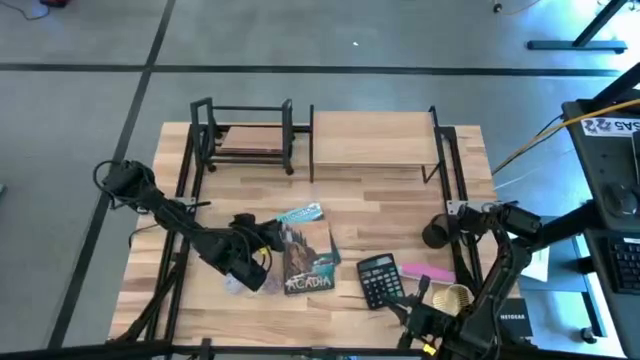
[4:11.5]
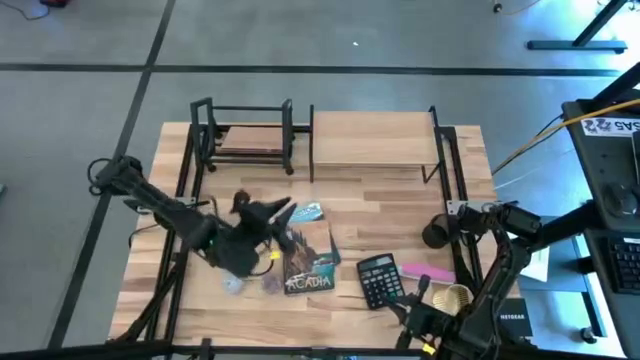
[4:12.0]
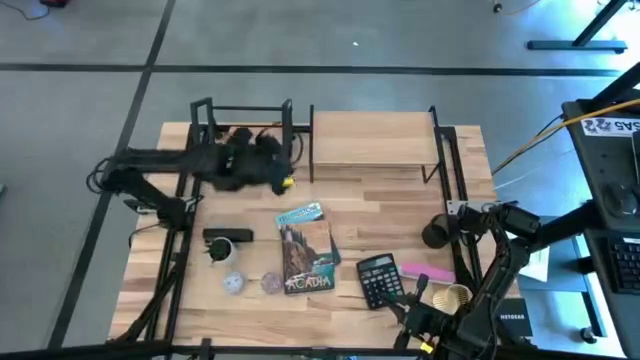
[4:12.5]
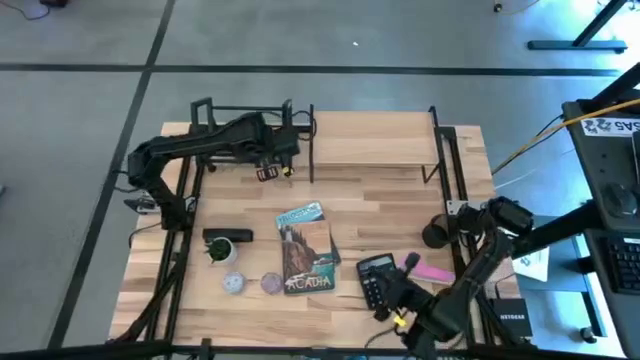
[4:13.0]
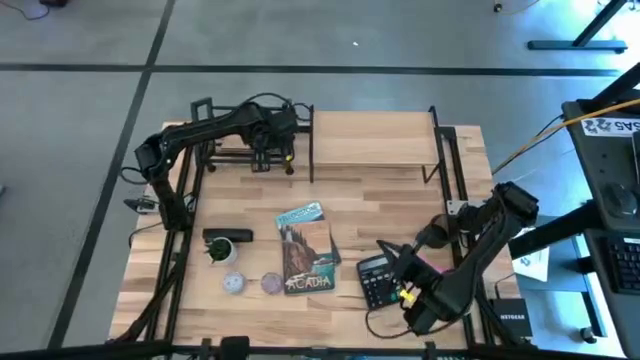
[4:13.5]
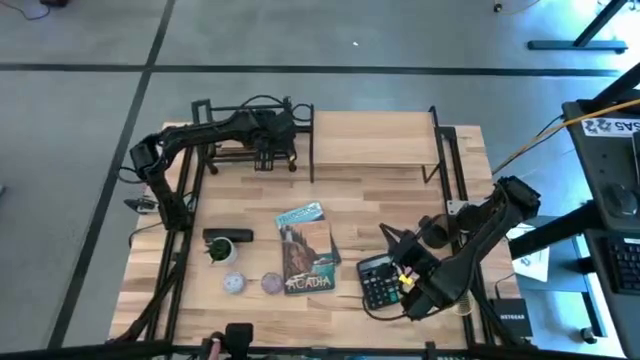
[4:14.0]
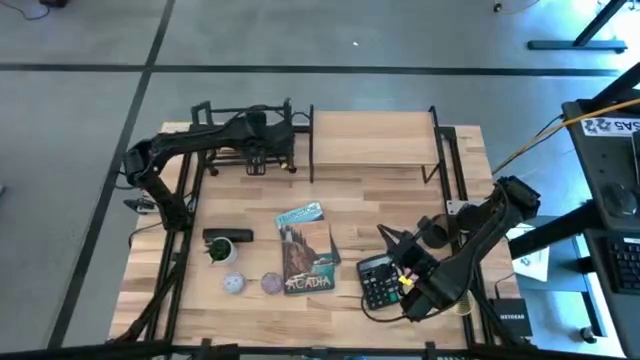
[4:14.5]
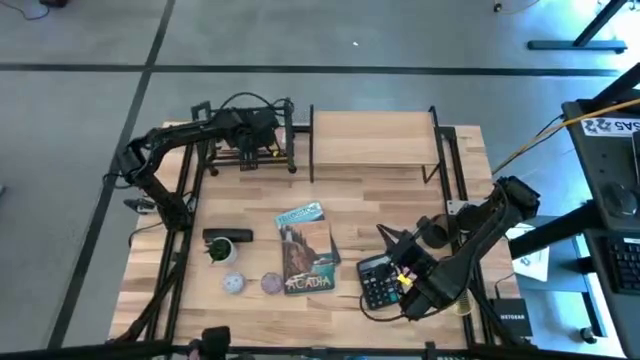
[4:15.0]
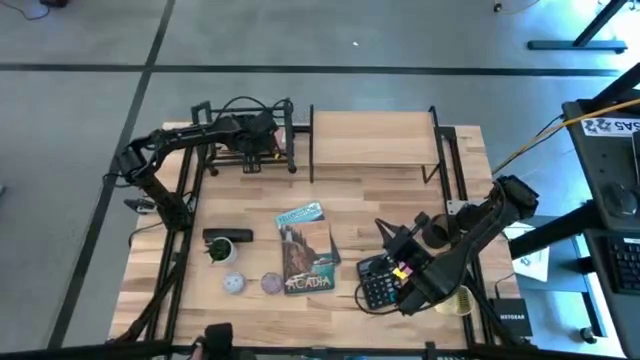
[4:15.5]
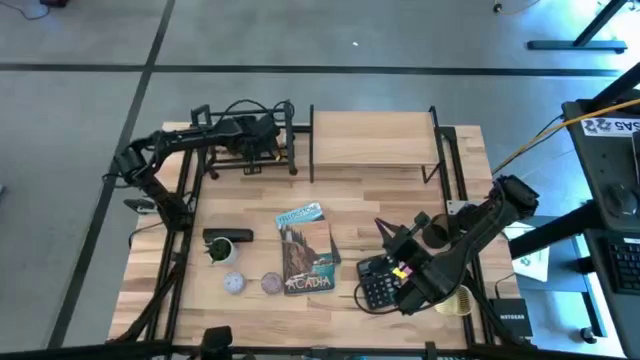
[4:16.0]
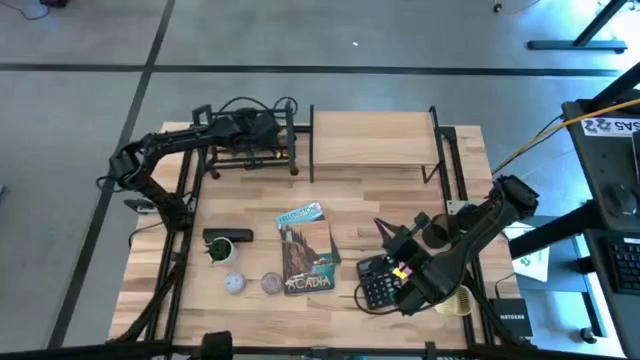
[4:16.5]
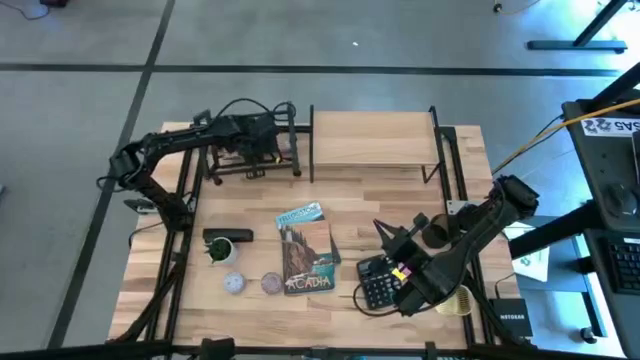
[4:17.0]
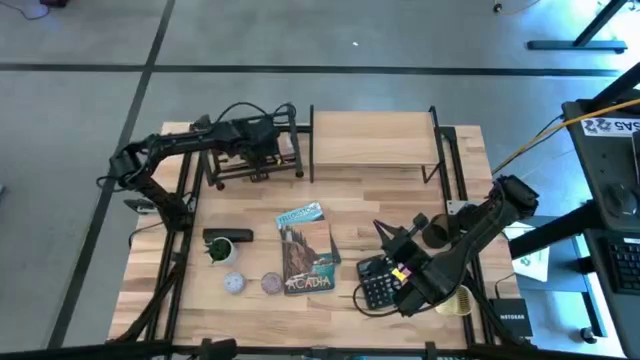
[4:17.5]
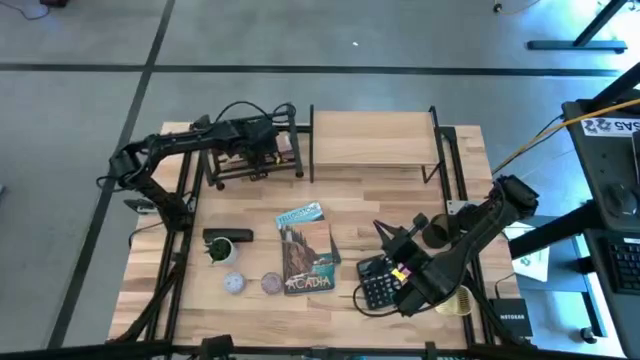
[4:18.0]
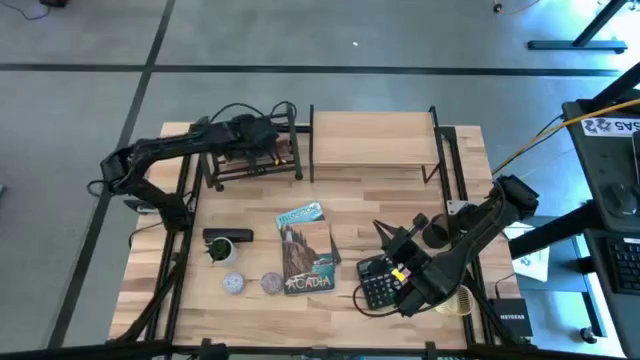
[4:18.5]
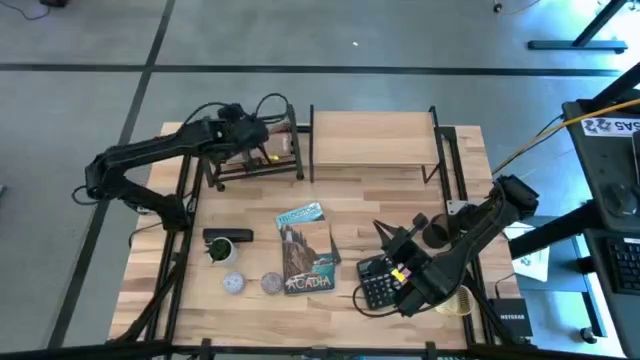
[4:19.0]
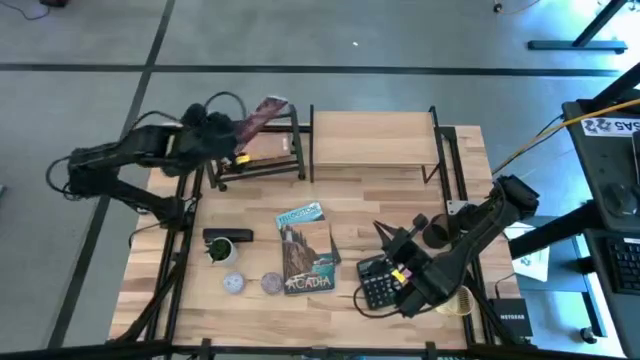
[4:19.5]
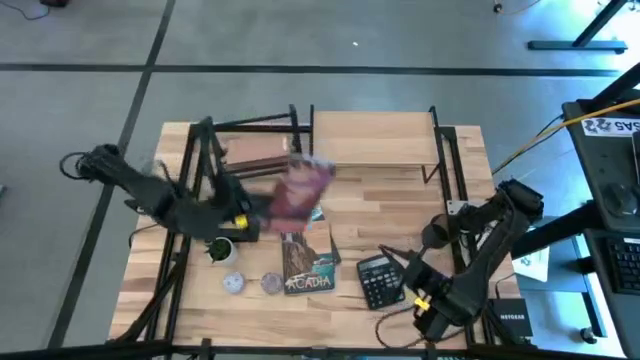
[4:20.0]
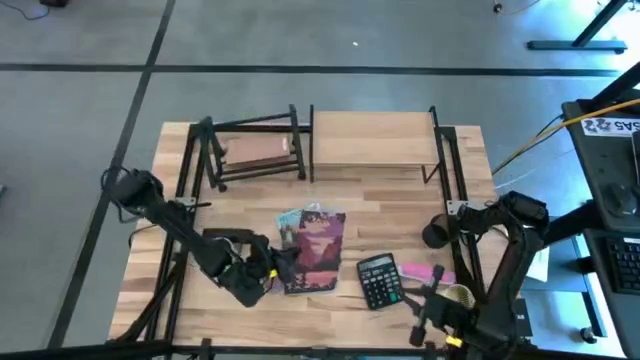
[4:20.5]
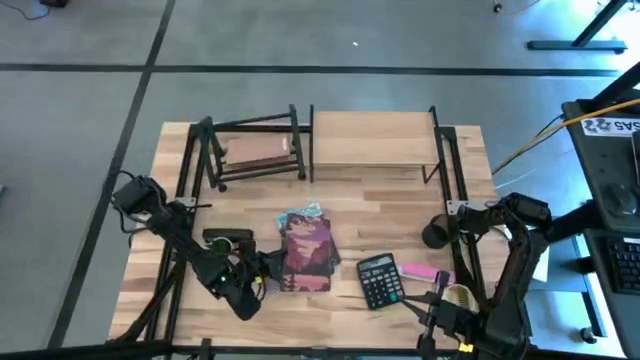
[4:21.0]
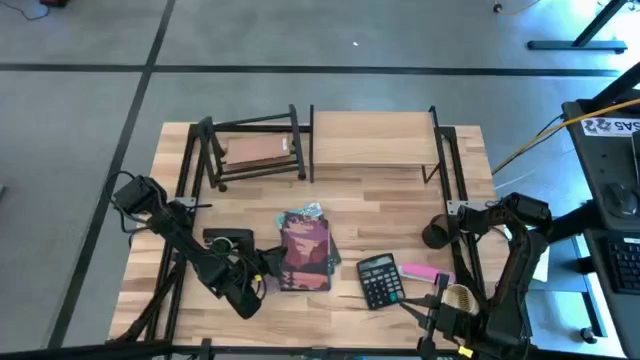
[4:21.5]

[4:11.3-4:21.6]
Task: Stock shelves
Remove the top red book from the bookshelf

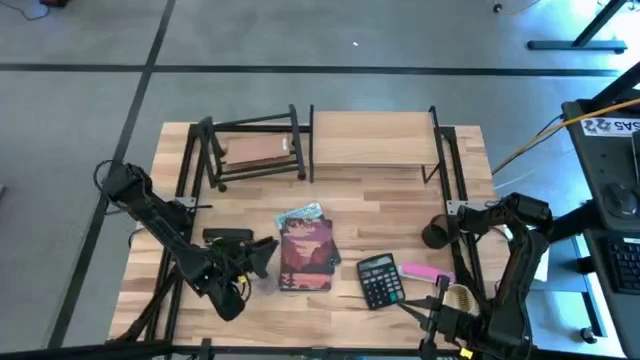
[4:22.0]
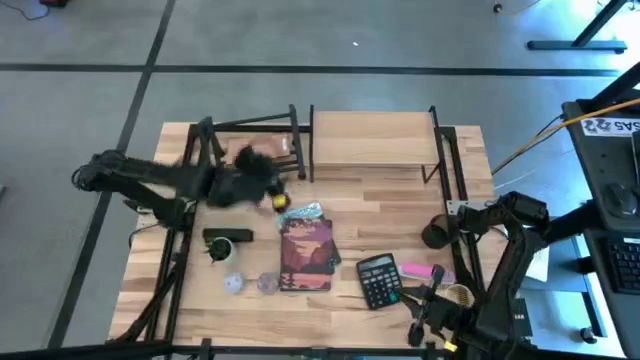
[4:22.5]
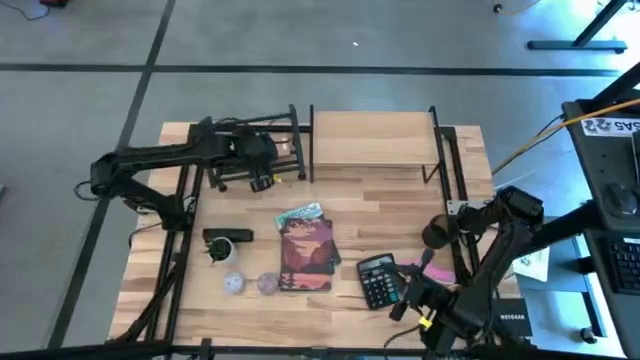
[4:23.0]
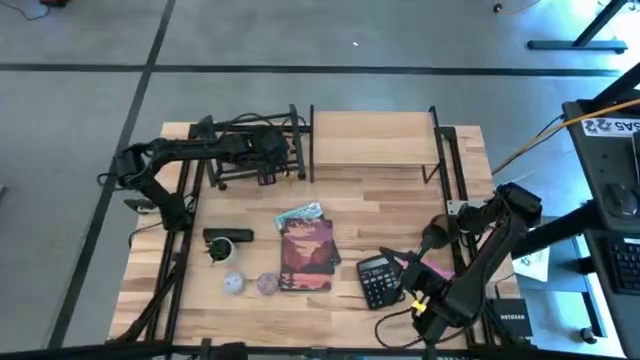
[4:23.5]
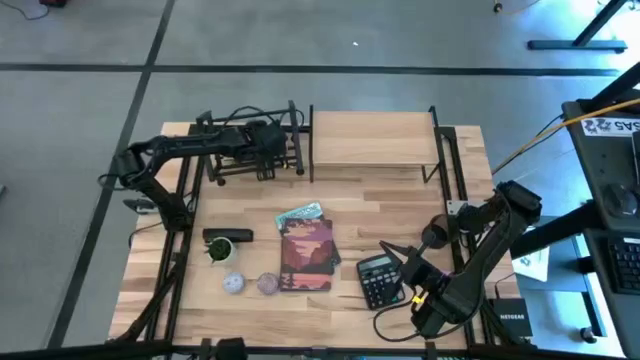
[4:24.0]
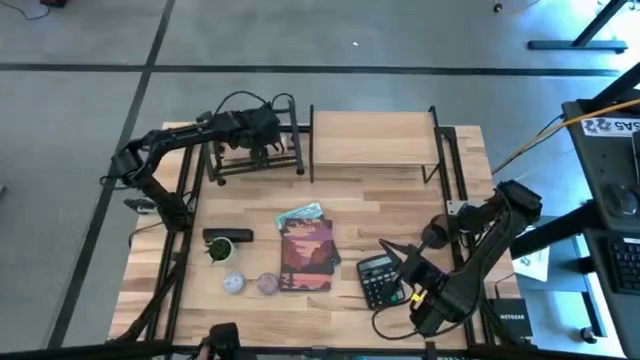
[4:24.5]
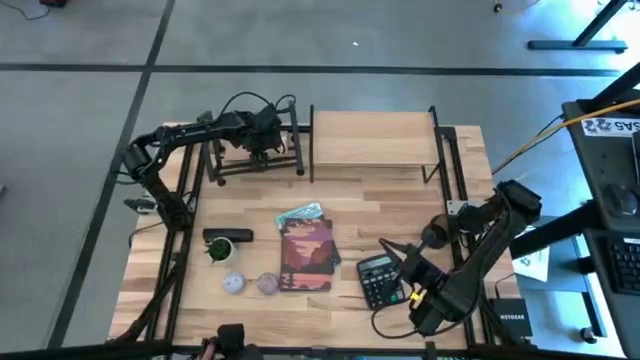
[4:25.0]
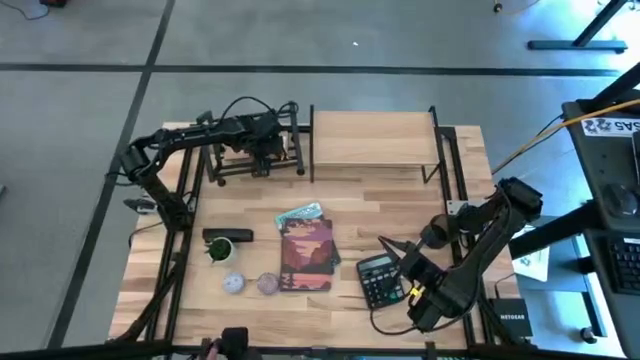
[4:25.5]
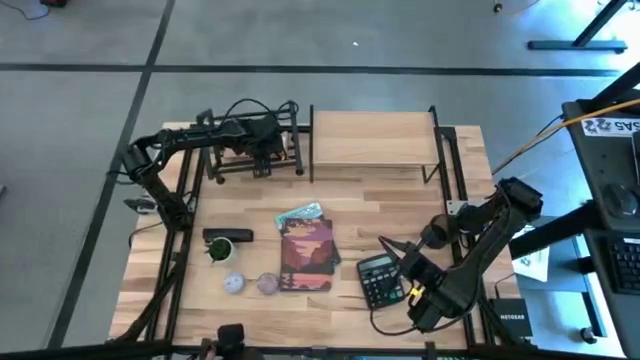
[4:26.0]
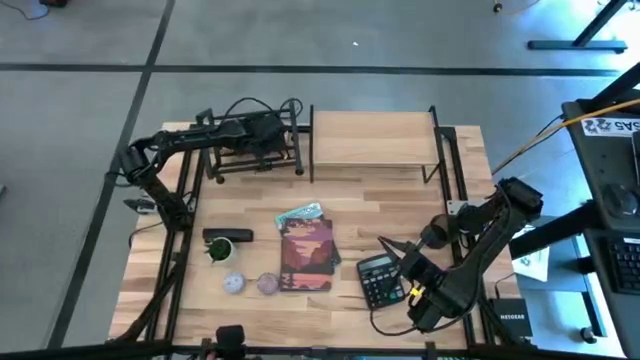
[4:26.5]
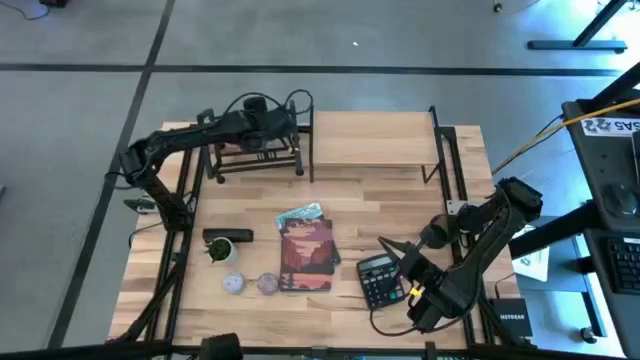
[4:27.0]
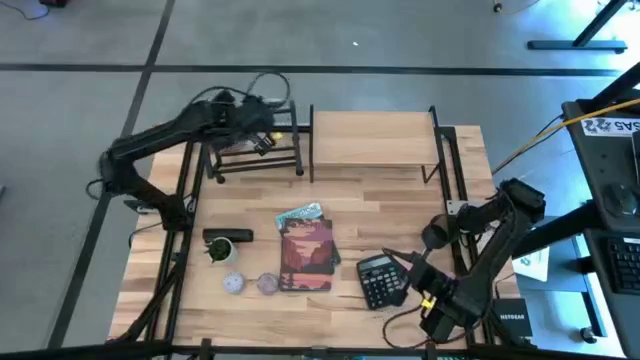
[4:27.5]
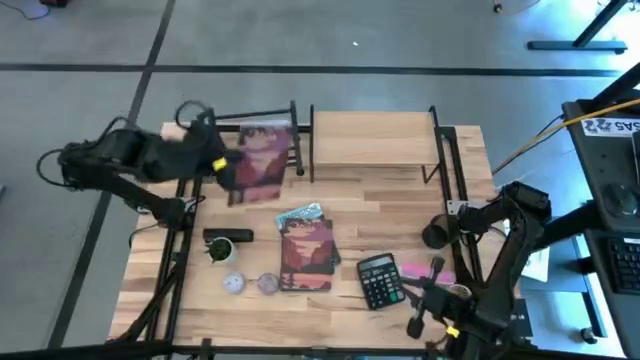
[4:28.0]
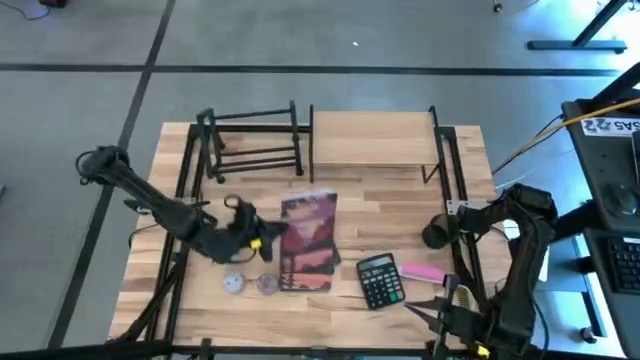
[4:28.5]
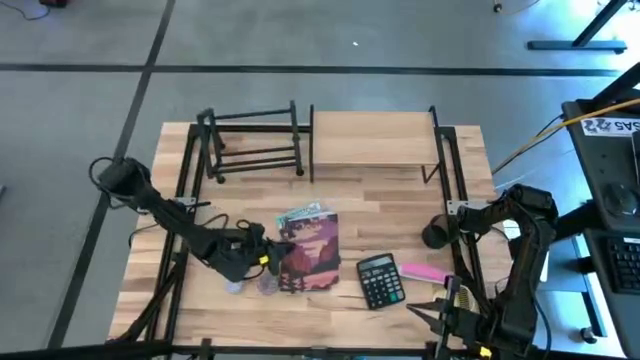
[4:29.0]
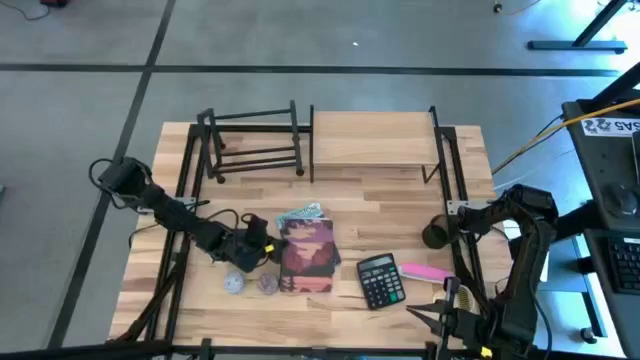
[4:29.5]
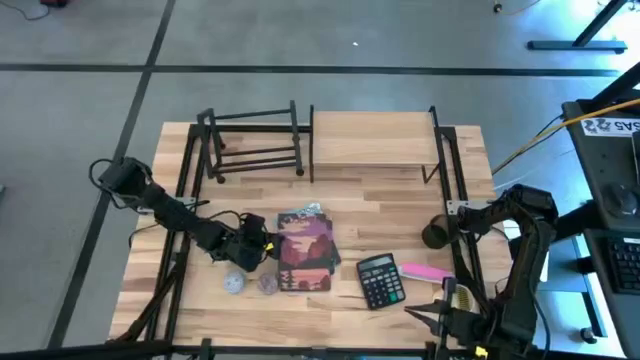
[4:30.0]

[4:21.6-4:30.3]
Remove the red book from the bookshelf

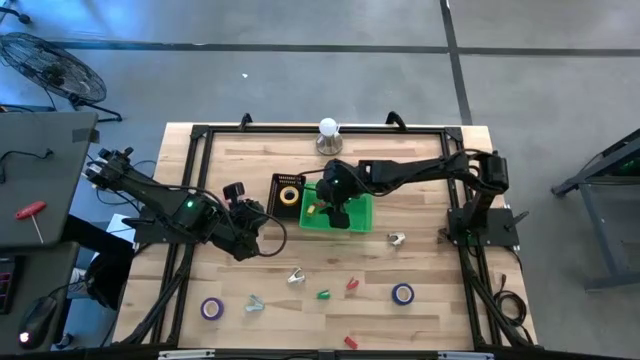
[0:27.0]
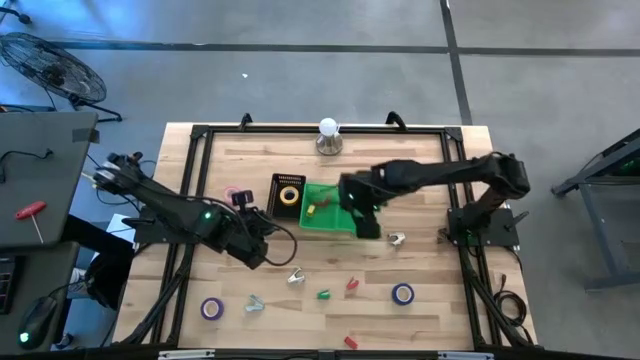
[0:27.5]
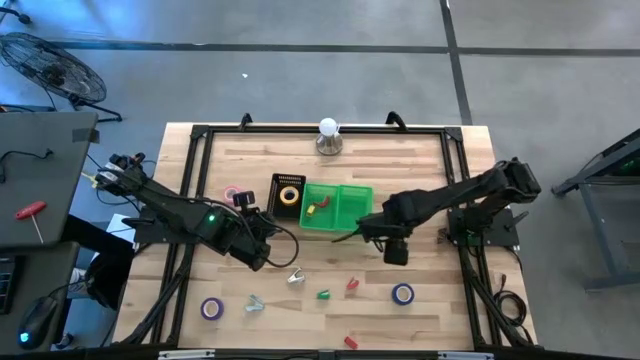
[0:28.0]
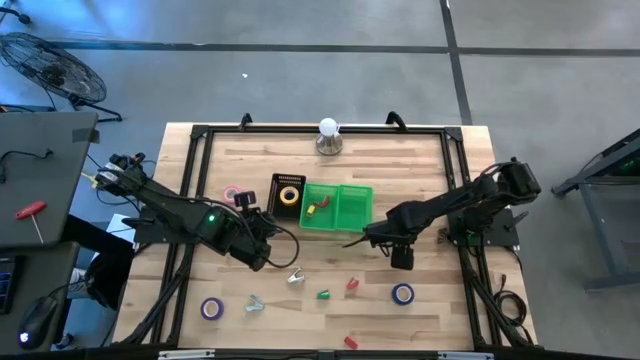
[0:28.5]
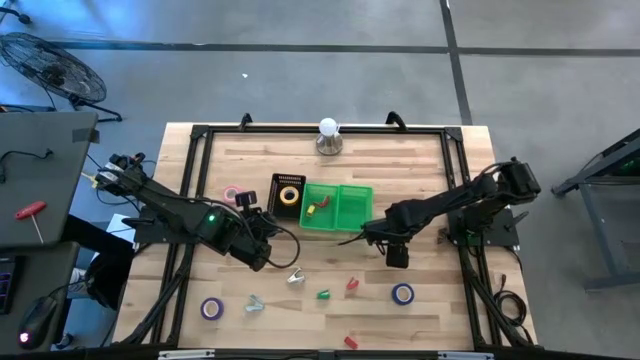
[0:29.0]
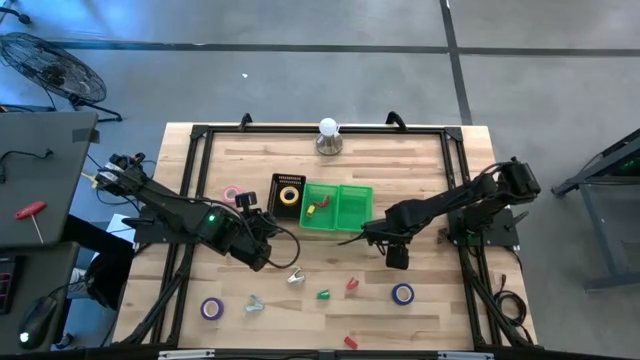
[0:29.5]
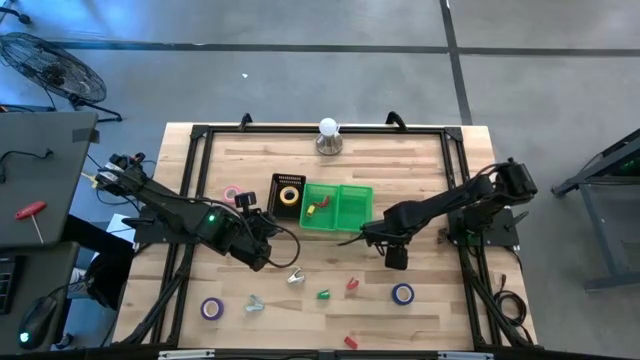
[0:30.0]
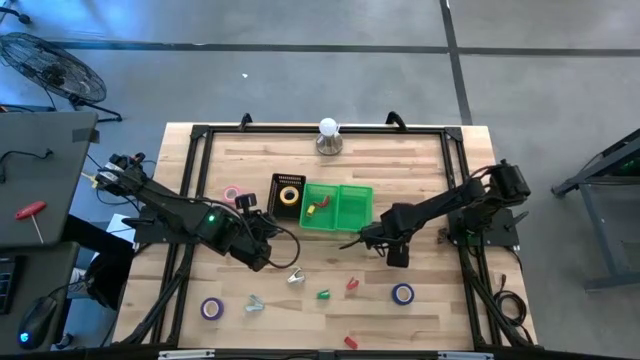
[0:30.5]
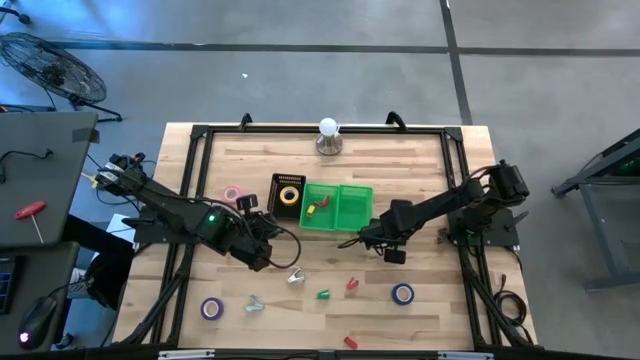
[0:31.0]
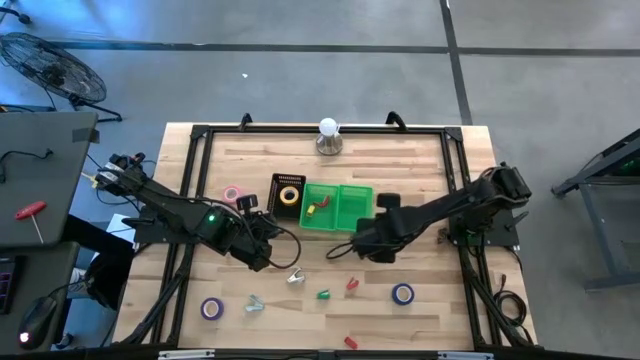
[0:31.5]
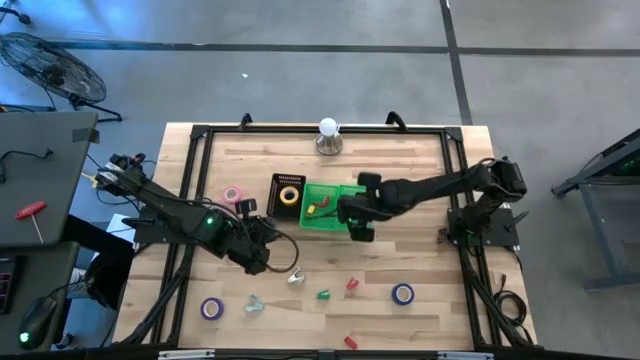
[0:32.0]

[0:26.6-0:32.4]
Task: Pick and place Stapler, Stapler remover, tape
Put the top gray staple remover into the right green bin
